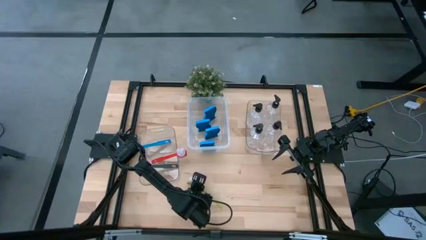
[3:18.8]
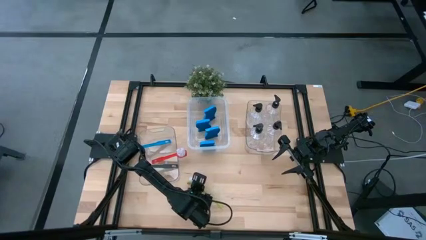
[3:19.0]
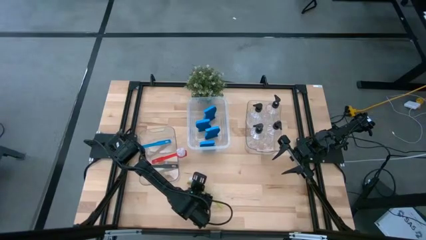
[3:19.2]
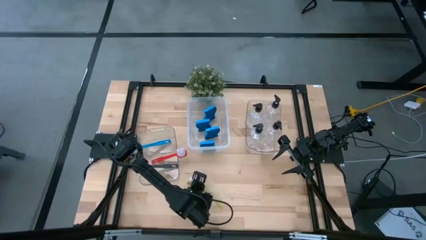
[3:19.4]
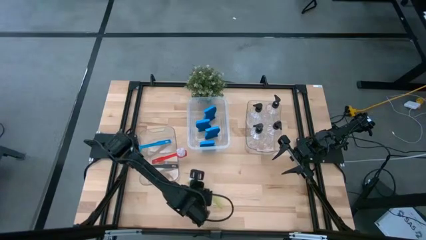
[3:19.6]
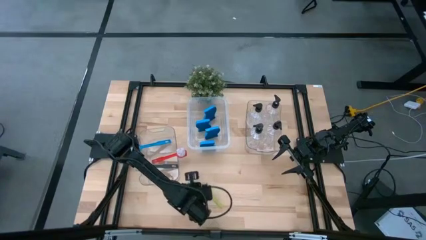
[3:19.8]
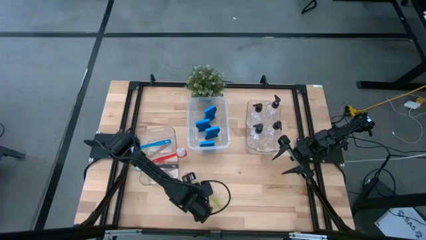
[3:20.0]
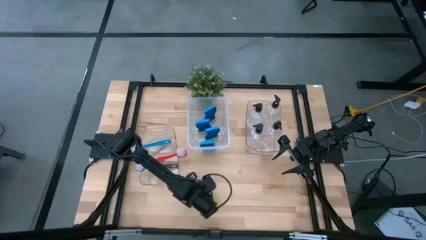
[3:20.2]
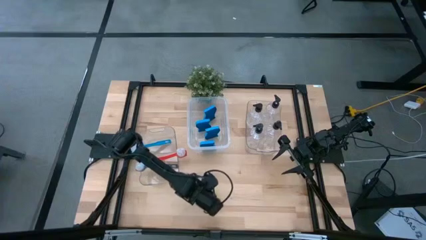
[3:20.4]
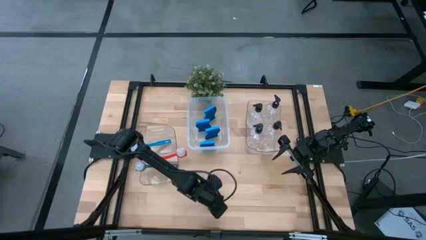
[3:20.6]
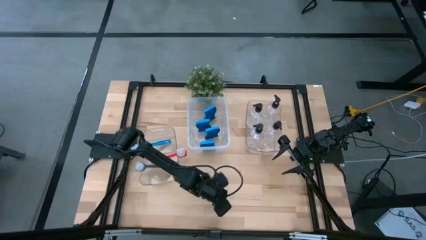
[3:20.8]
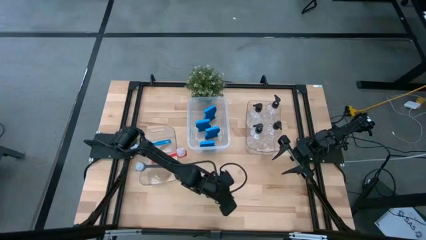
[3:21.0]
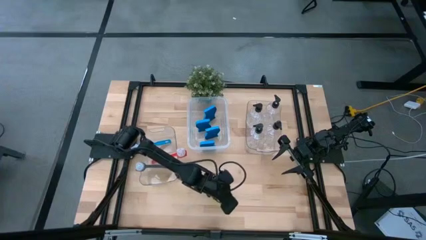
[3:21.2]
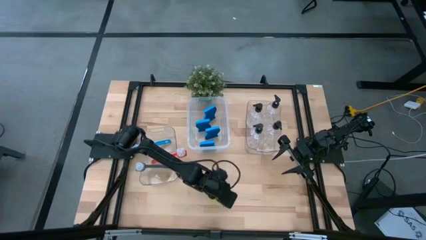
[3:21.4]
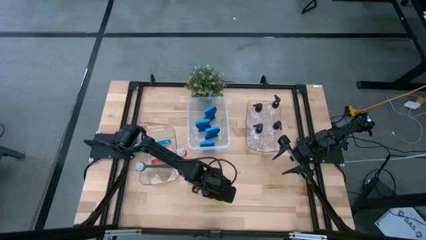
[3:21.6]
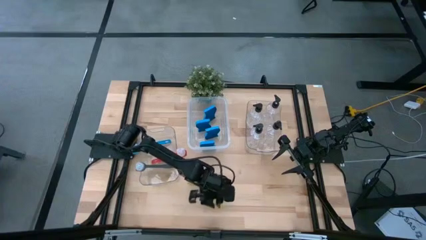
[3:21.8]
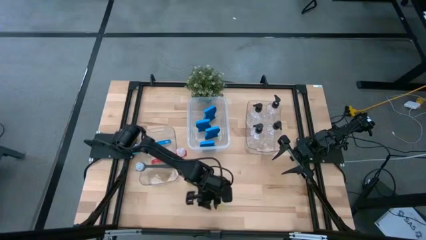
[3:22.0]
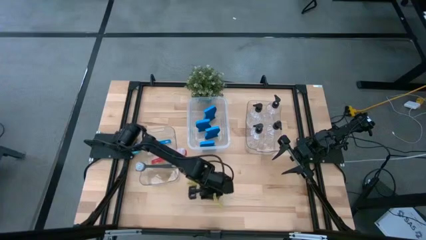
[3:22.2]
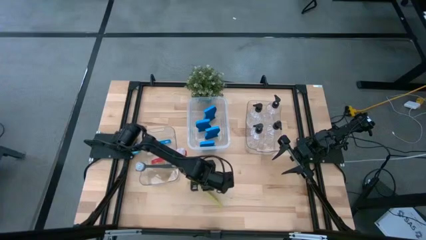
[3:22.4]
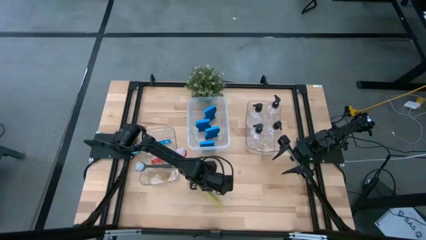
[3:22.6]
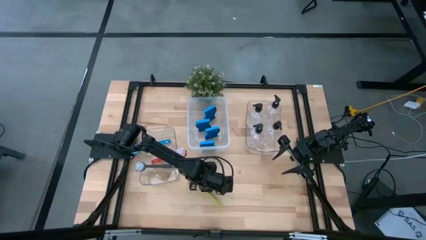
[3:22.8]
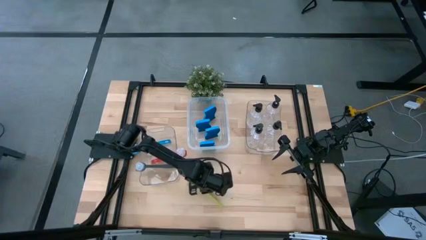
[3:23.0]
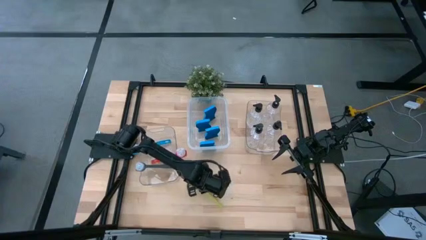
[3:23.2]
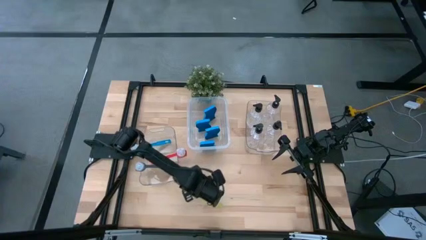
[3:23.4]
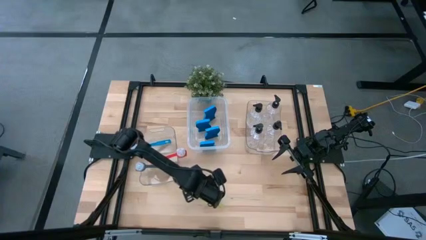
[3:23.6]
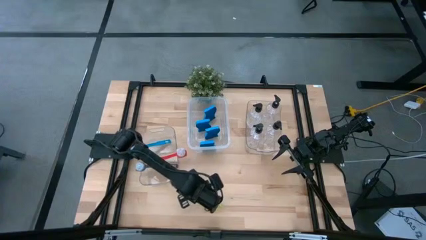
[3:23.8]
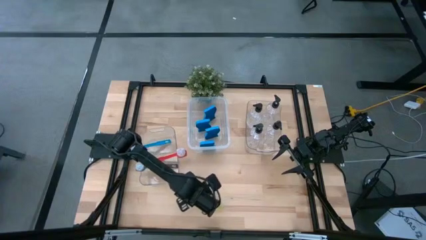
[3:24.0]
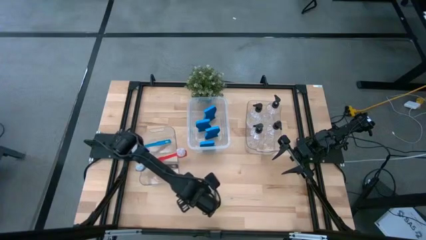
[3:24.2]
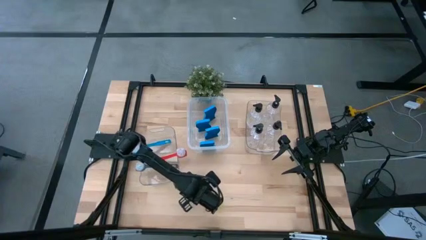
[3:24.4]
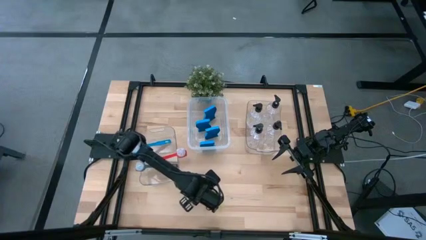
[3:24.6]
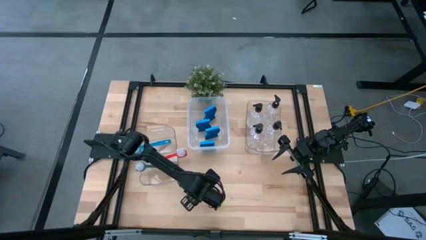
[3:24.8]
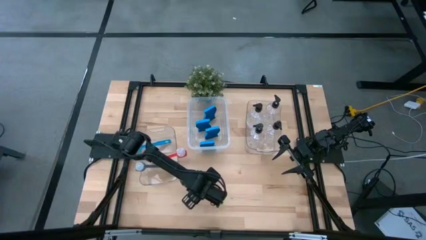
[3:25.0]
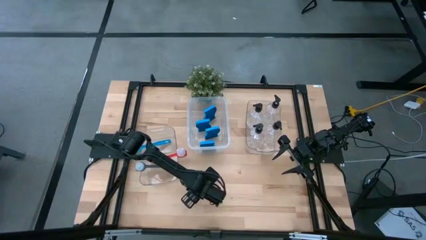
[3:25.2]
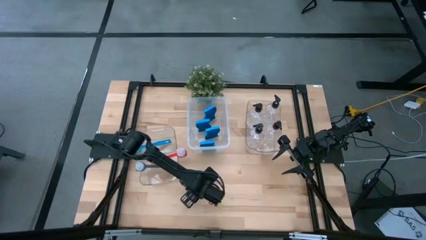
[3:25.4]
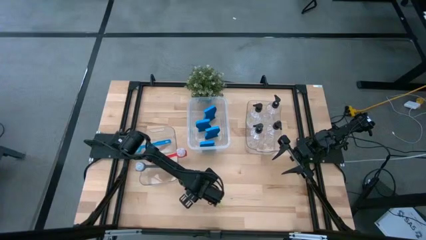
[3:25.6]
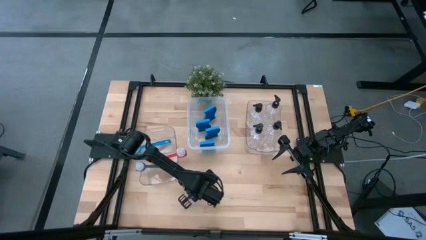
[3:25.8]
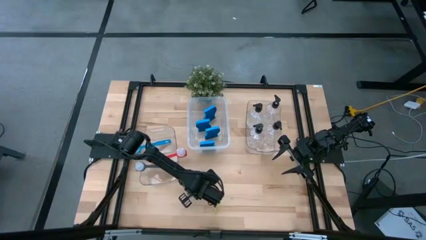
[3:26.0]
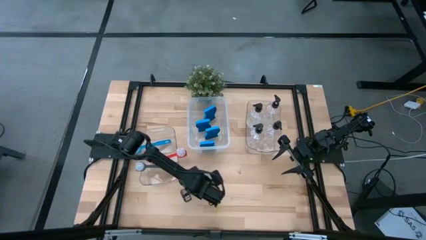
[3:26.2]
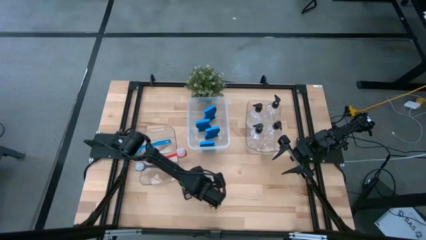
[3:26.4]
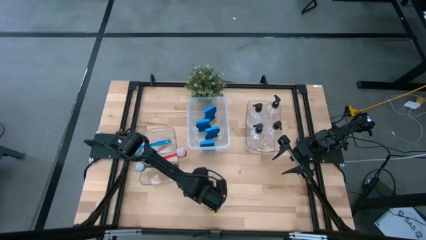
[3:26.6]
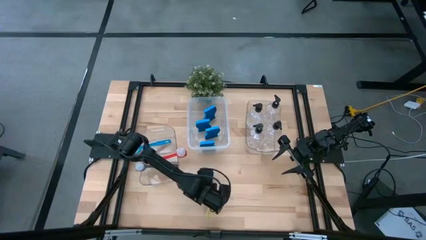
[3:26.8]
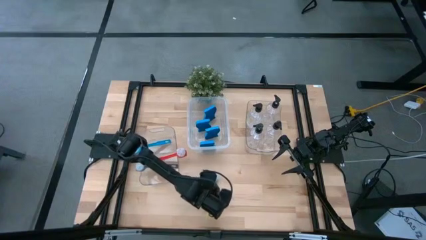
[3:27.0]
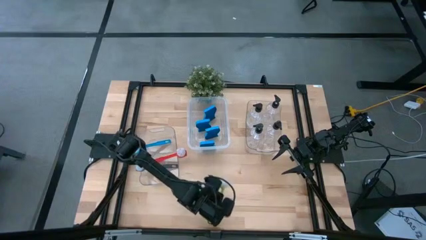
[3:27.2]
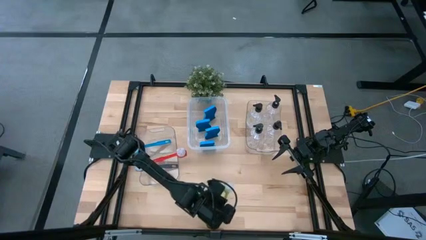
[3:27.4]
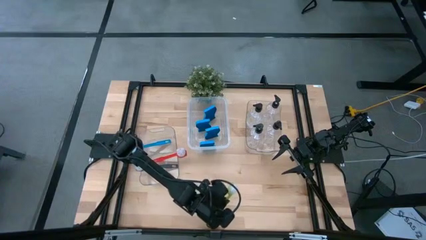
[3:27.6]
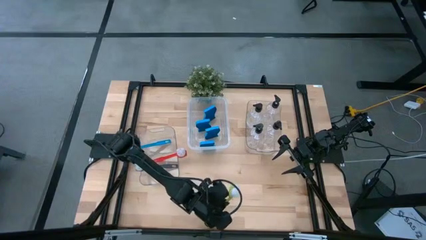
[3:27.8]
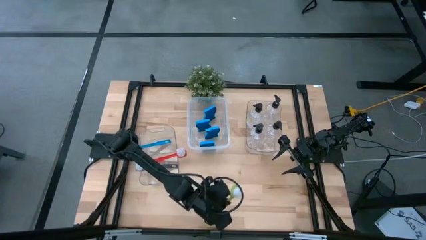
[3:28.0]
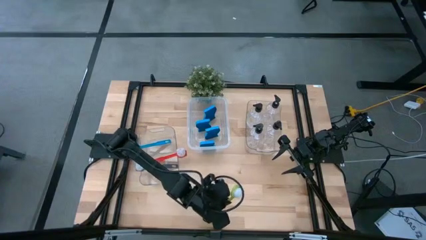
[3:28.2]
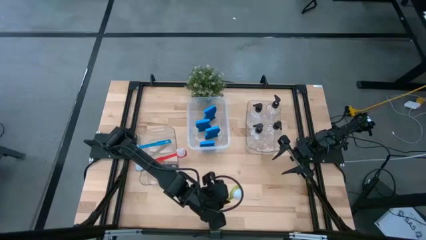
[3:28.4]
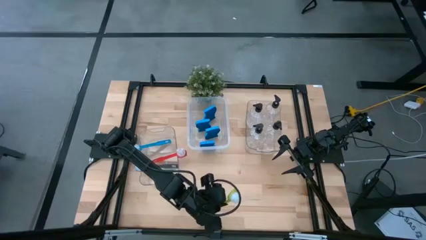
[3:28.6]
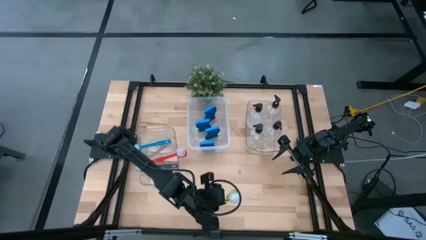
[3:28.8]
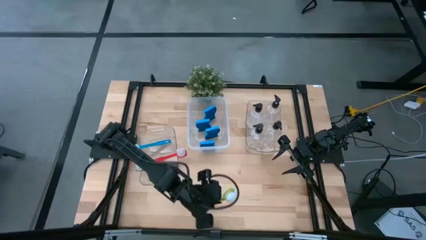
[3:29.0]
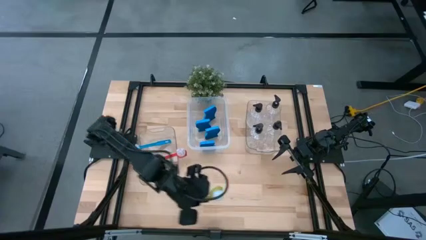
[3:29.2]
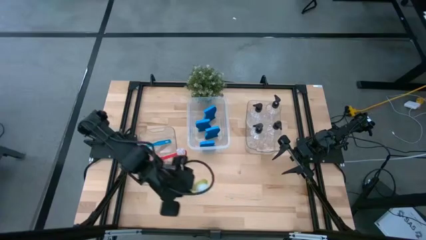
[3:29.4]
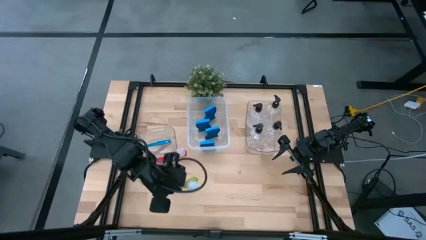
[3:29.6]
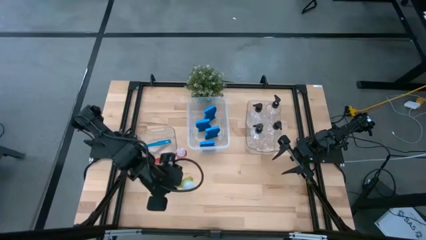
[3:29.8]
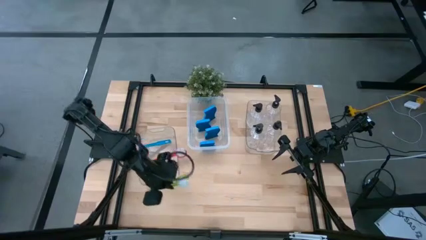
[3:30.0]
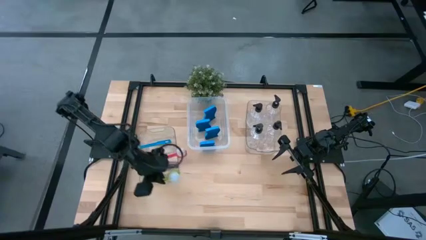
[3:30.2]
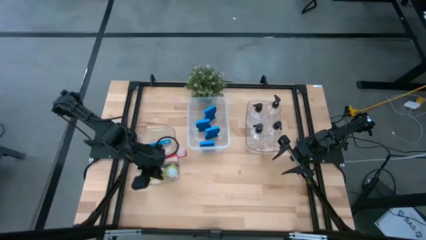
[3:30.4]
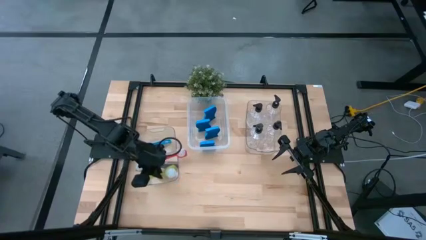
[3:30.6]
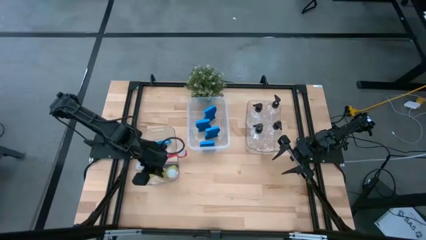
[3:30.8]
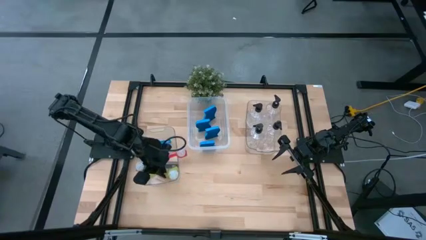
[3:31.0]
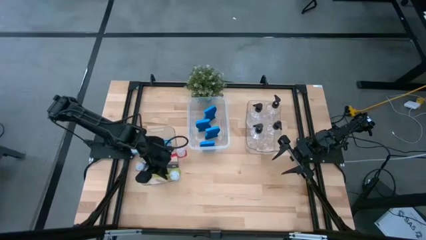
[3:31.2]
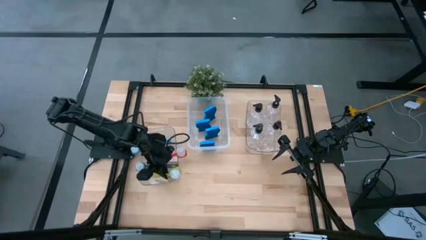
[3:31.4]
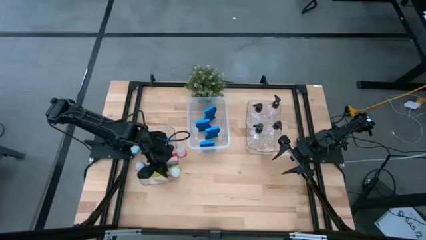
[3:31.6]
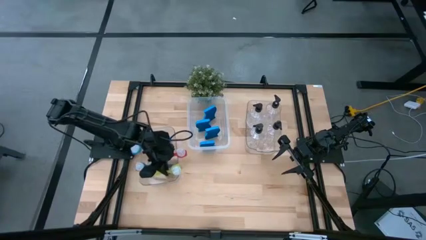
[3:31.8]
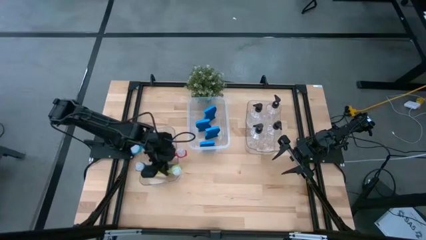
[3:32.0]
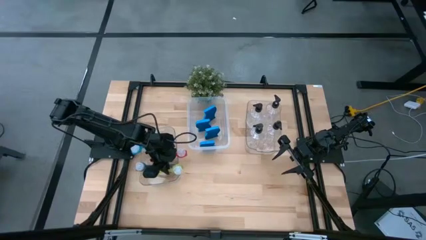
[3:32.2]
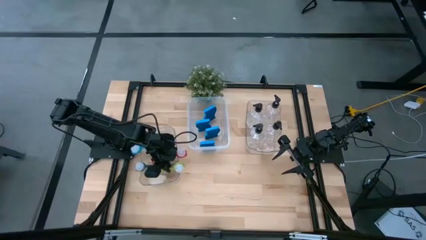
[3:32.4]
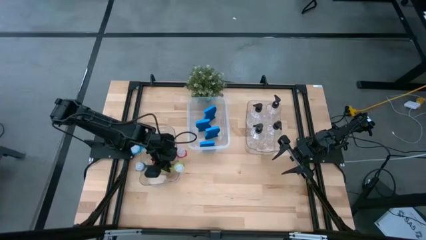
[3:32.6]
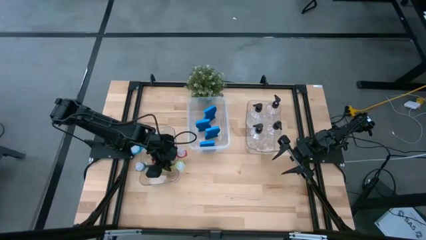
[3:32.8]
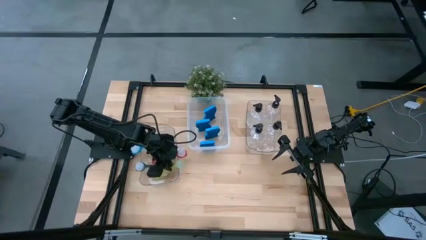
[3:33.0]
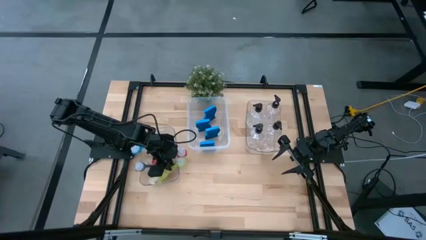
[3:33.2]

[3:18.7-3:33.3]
Task: Pick & Place Kitchen Sink Supplies
Put the green brush into the left transparent bin
